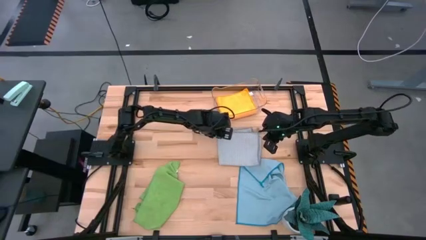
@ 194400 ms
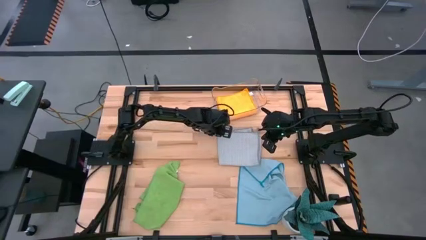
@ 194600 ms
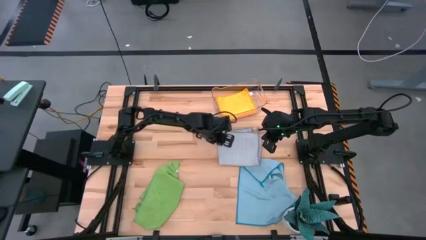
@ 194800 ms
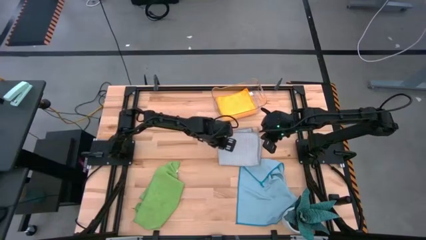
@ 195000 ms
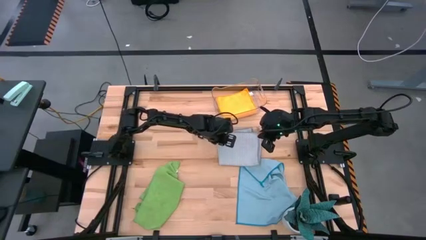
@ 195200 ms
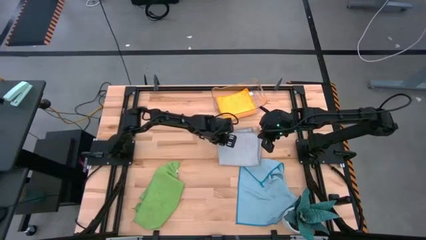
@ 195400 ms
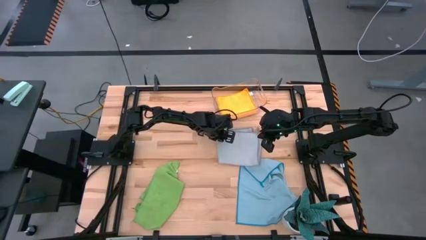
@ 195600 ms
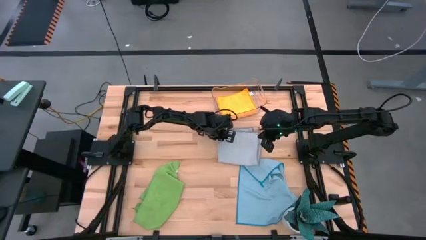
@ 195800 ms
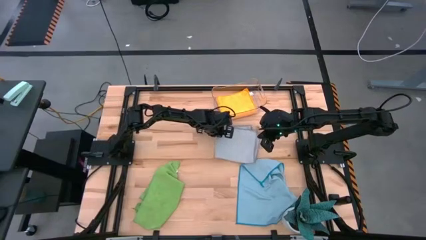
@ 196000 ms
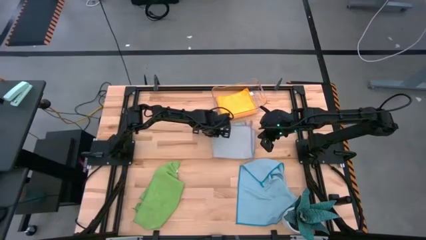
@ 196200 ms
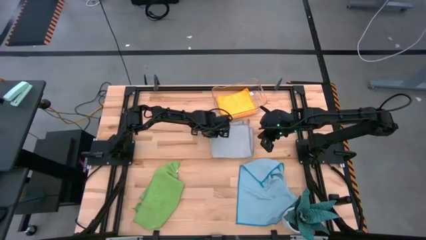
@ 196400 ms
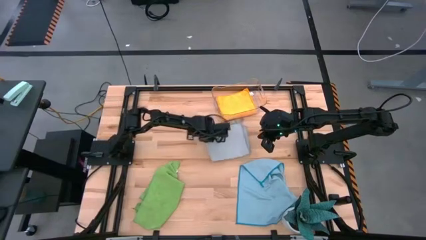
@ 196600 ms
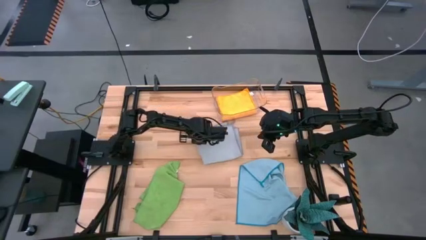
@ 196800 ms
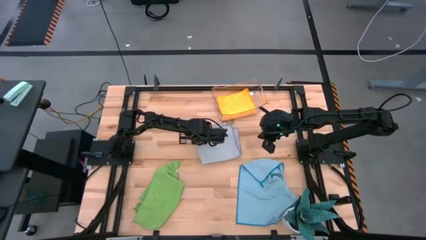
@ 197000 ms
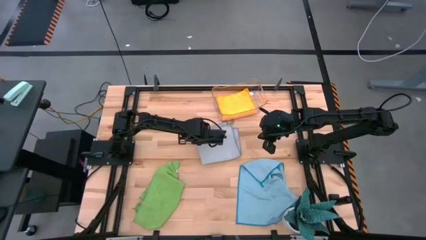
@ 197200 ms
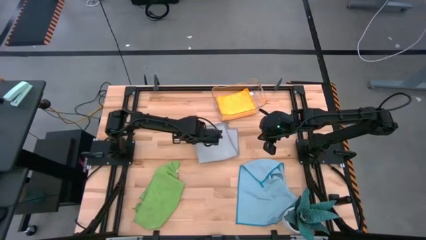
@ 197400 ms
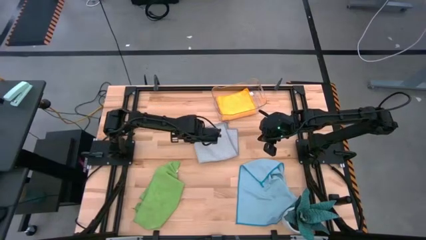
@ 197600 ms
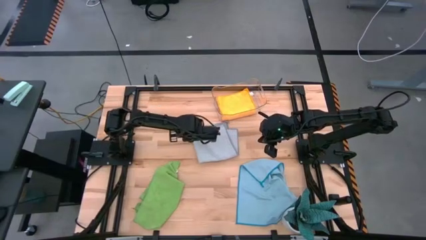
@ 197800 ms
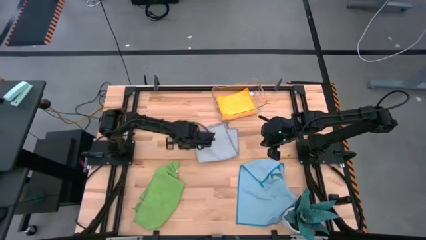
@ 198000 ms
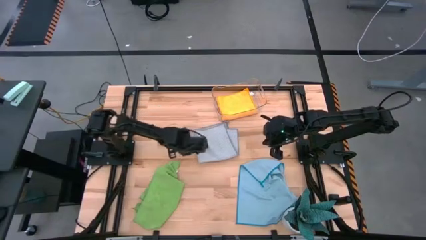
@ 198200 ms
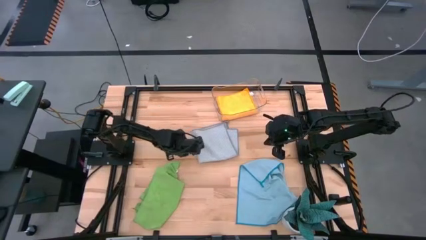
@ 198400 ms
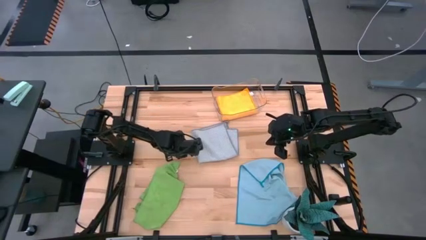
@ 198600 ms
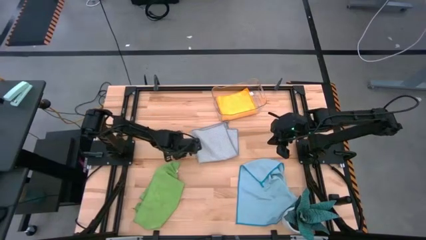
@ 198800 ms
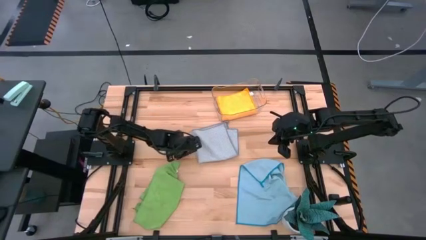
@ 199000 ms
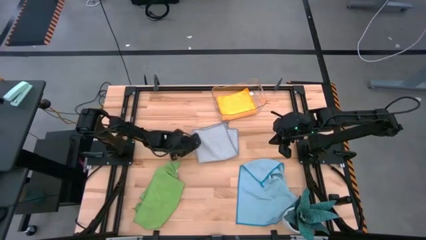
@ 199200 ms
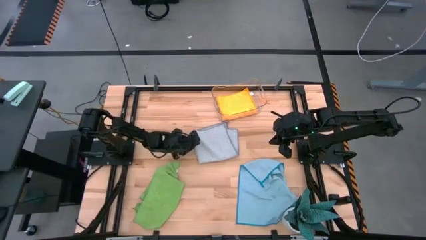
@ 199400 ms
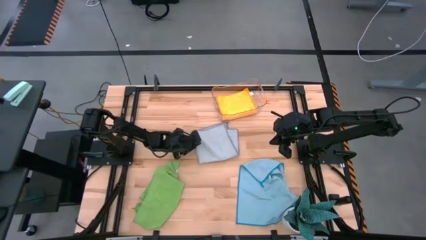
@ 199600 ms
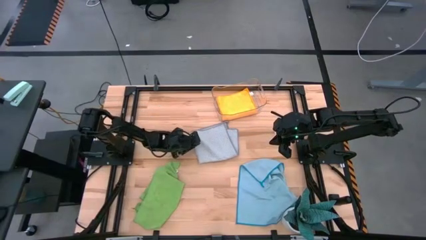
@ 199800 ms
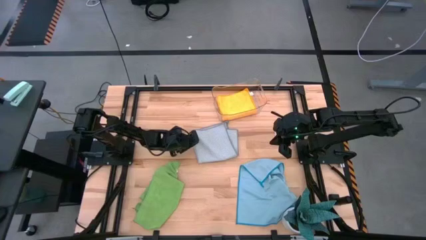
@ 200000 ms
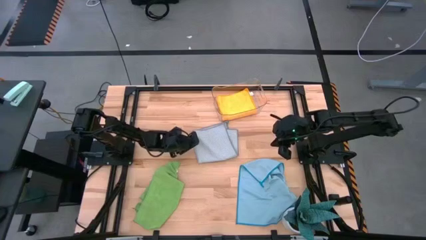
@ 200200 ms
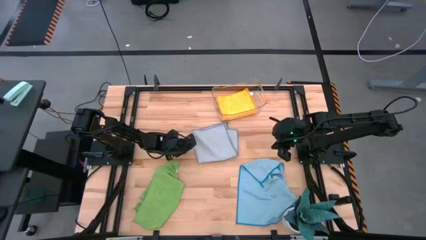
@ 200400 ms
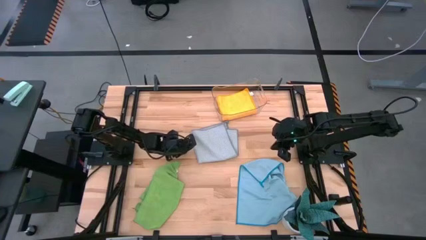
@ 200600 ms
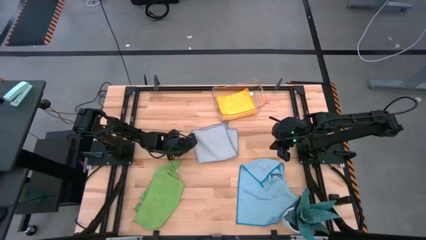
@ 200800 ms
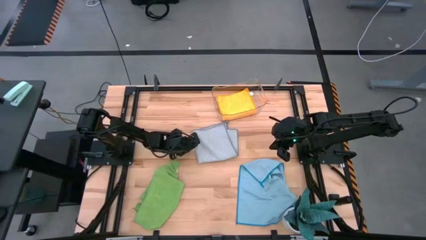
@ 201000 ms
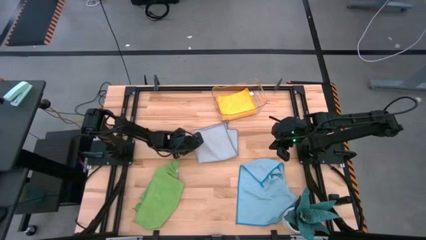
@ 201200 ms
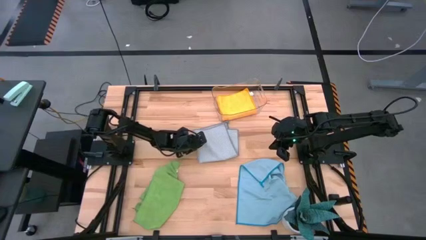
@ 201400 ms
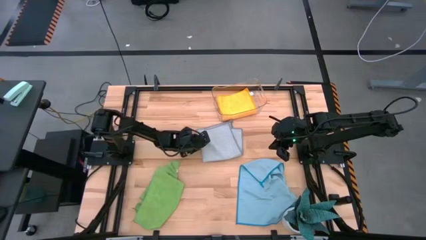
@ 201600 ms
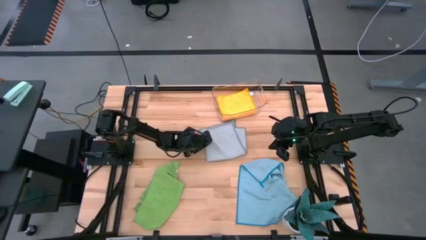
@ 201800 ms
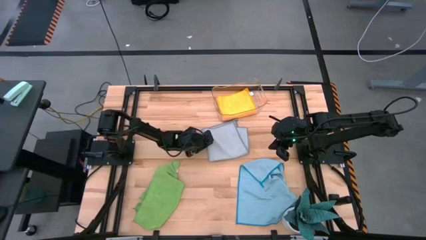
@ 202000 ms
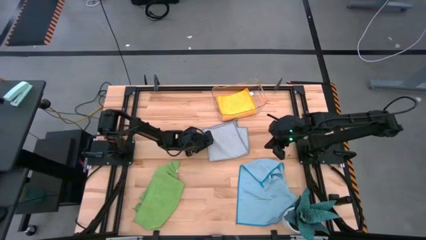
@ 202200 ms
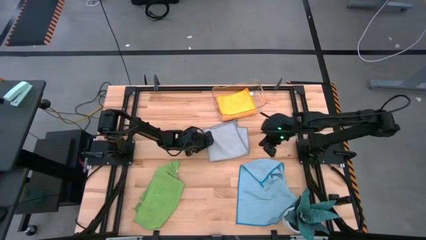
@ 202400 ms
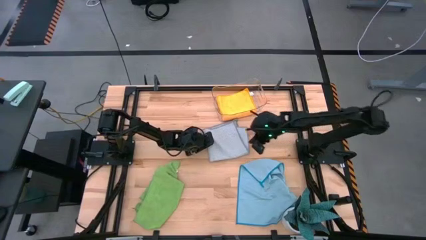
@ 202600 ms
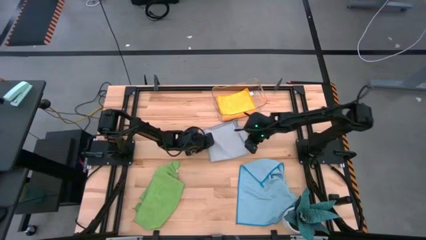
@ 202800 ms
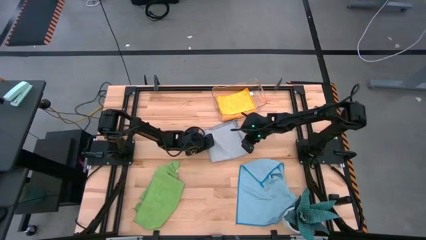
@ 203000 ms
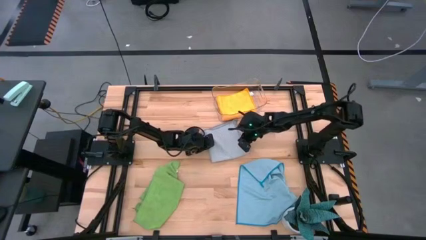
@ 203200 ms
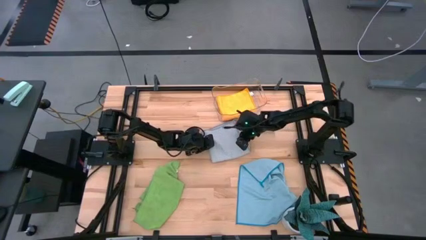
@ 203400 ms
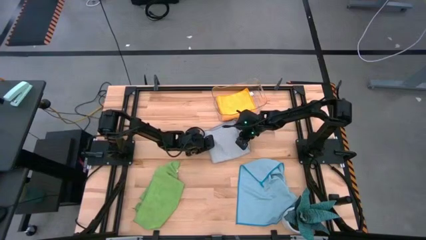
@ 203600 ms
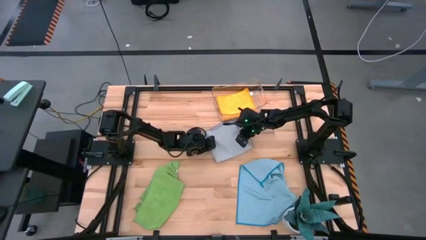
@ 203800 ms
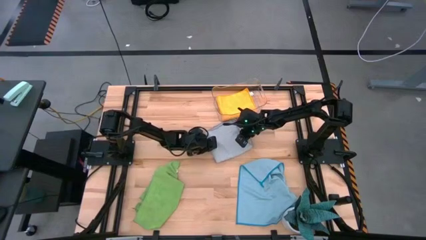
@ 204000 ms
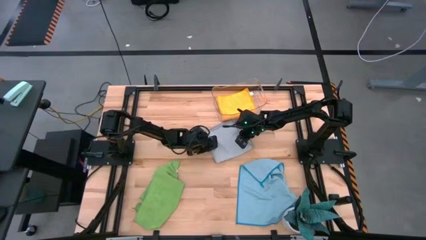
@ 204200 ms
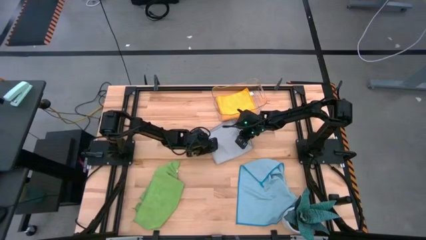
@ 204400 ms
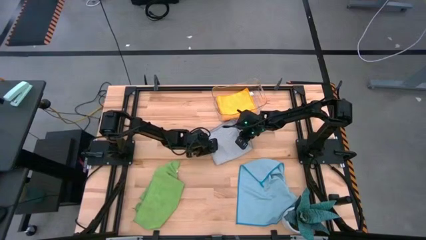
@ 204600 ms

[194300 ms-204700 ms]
Task: Fold microfiber towels
Put the gray microfiber cloth into the transparent bin

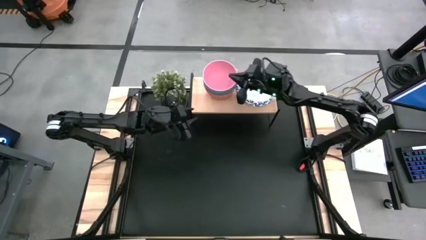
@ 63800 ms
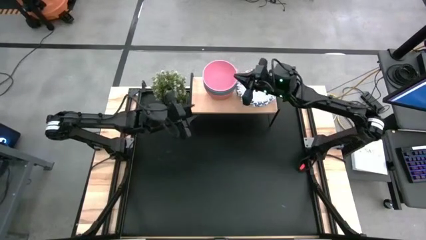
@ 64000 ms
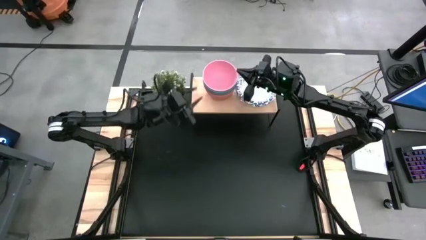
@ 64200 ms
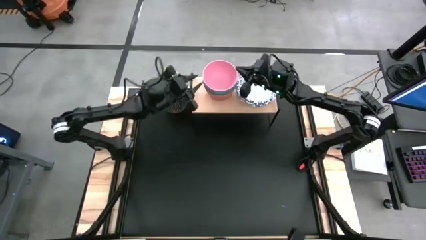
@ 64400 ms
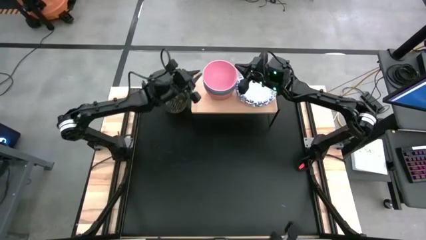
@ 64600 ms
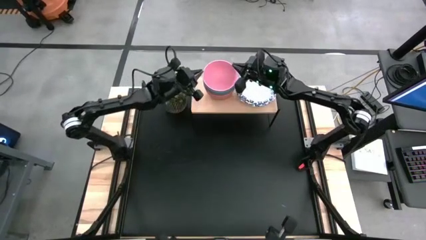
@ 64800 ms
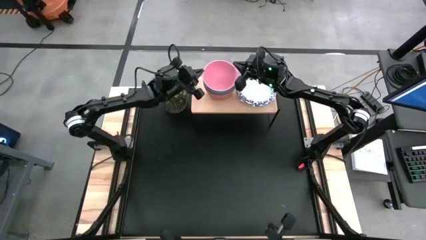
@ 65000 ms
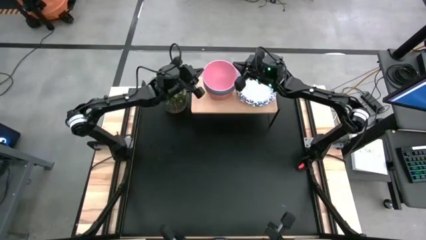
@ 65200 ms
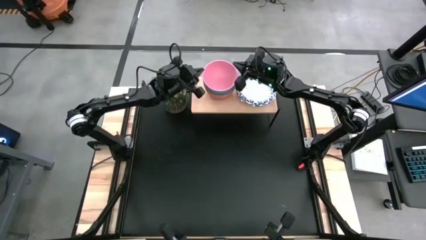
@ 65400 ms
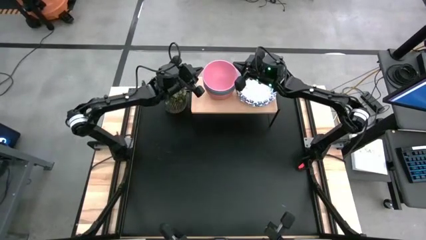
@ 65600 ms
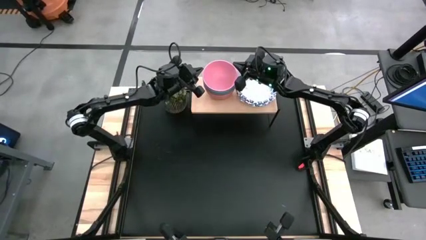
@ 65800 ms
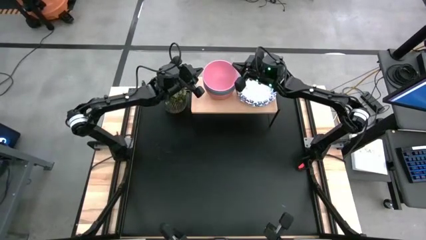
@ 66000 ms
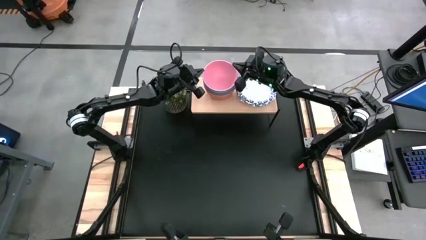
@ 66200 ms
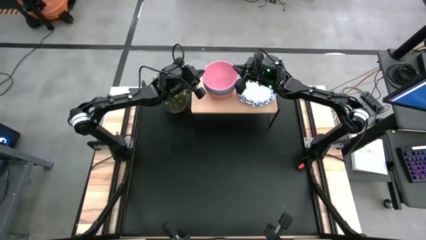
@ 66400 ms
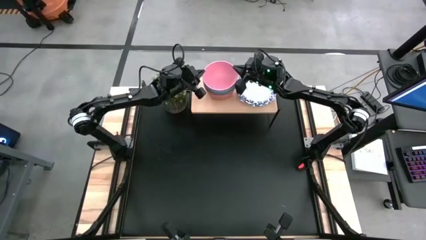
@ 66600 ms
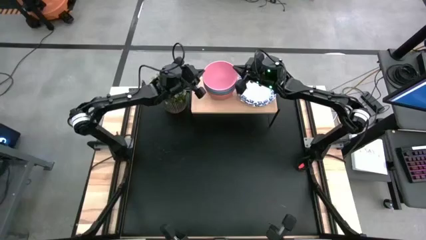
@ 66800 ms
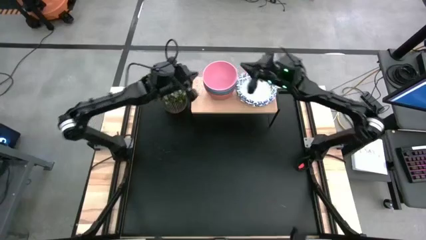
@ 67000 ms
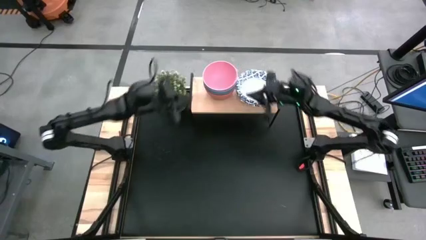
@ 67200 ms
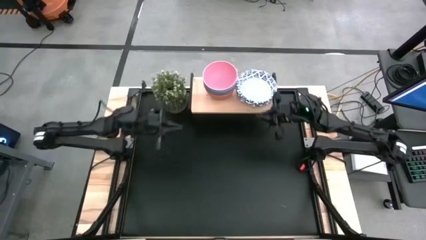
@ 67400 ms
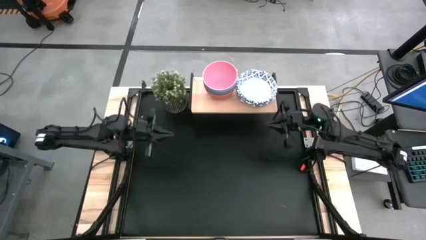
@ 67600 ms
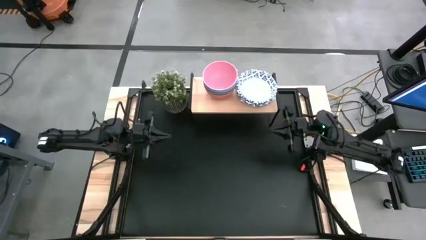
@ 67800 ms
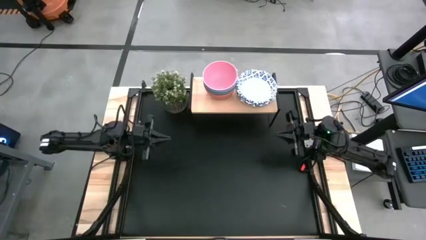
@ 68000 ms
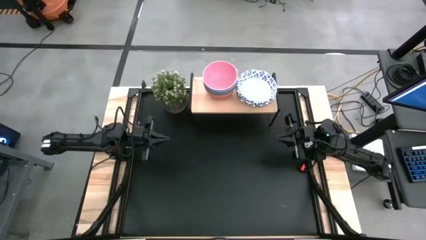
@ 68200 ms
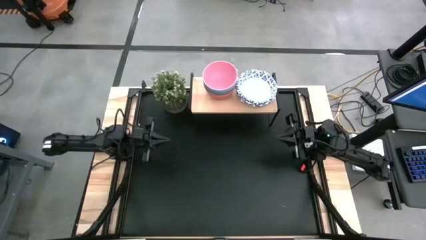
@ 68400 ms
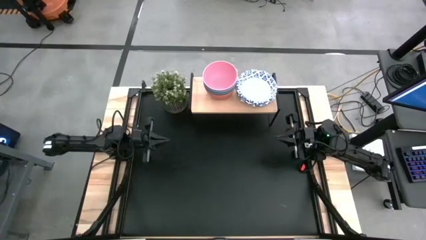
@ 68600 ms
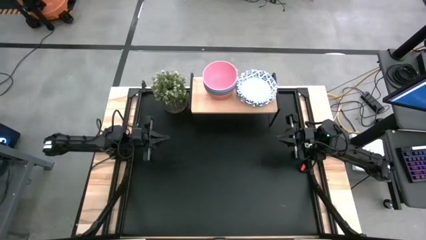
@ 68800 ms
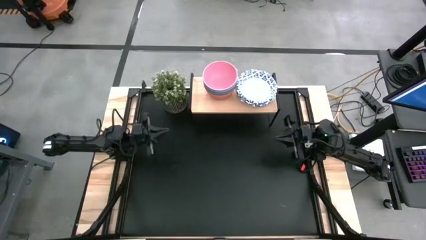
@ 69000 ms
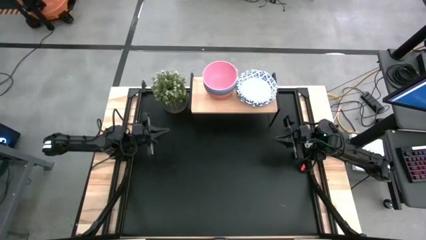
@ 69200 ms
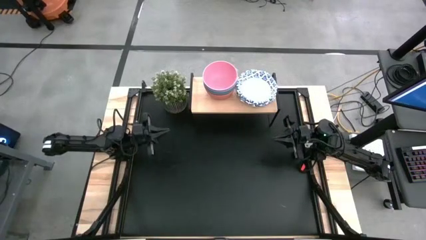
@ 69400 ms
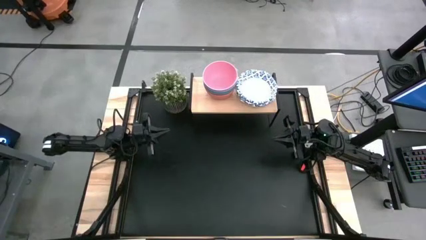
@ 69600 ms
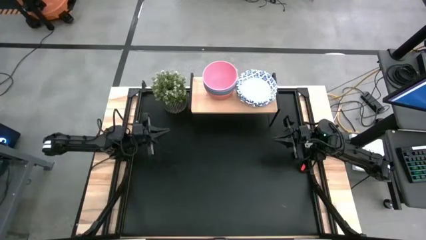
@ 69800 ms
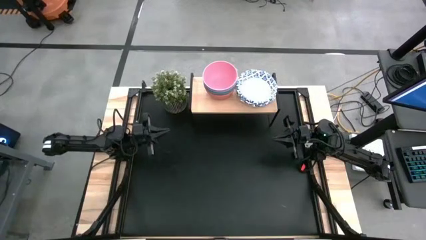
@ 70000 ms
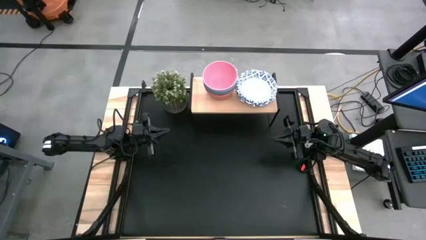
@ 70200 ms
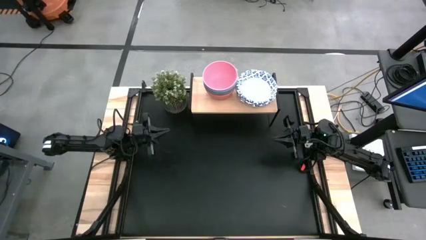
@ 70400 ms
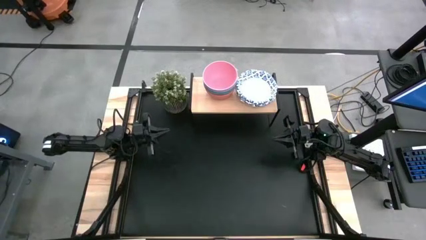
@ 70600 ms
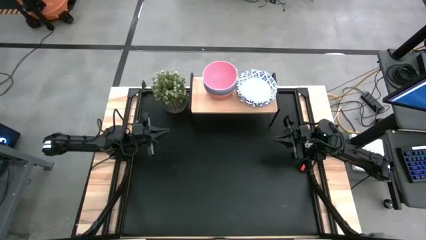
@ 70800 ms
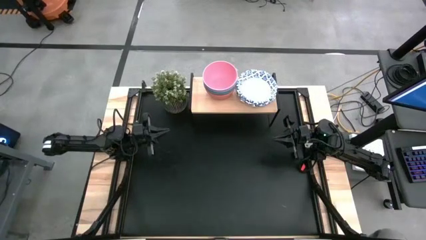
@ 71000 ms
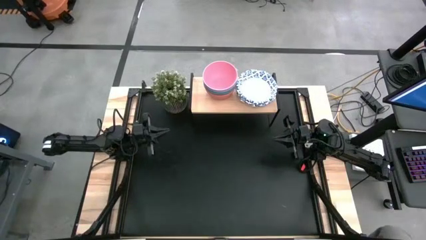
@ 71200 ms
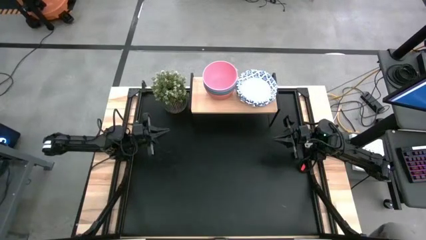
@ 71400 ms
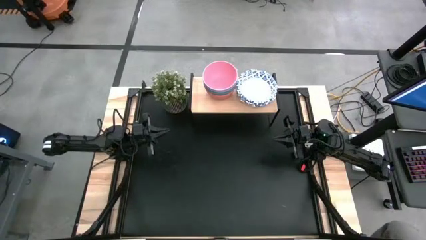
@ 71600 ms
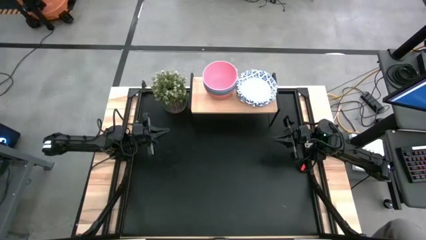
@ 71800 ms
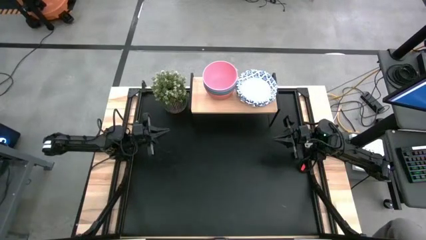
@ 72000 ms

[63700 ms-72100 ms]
Task: Place and stack bowls onto a shelf
Return to Home Position
